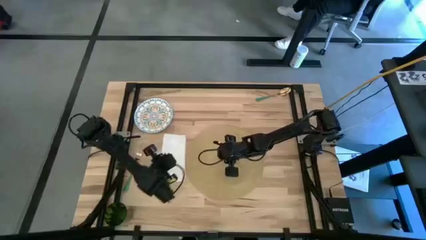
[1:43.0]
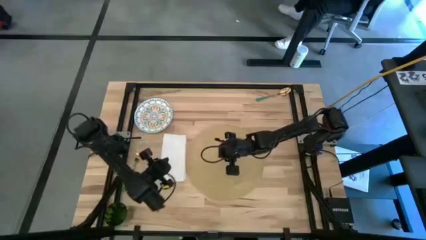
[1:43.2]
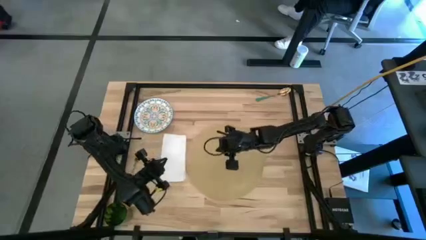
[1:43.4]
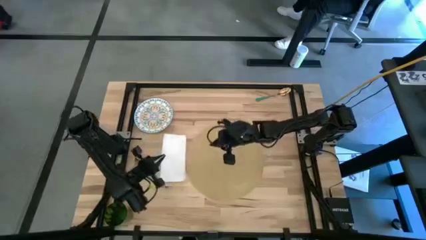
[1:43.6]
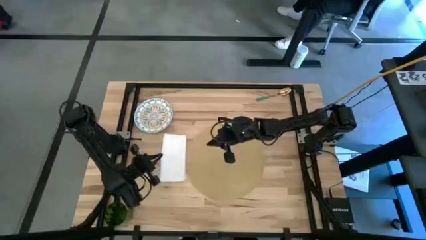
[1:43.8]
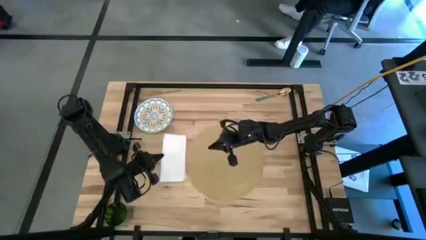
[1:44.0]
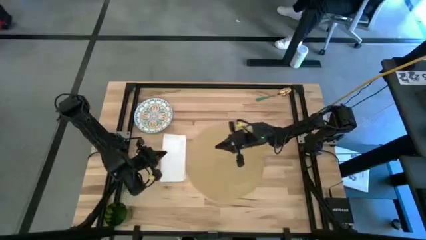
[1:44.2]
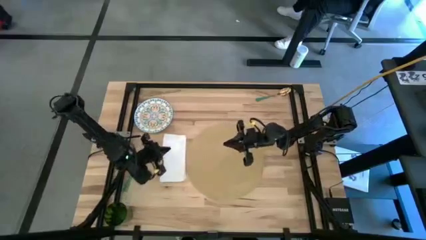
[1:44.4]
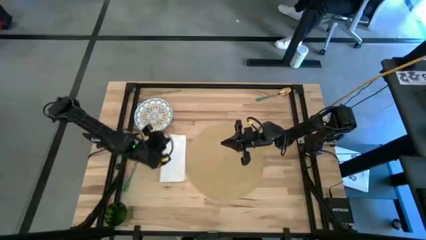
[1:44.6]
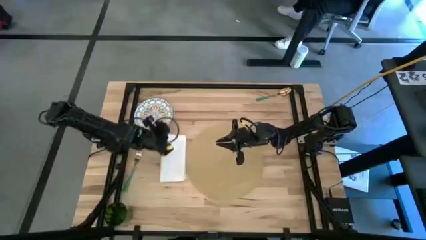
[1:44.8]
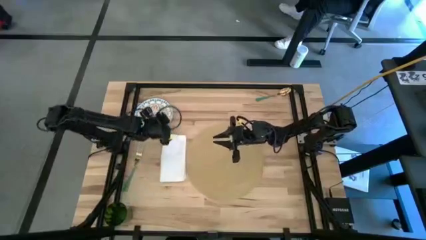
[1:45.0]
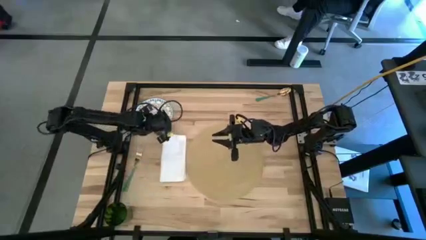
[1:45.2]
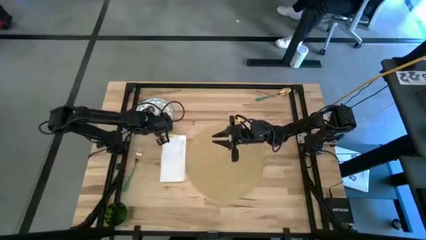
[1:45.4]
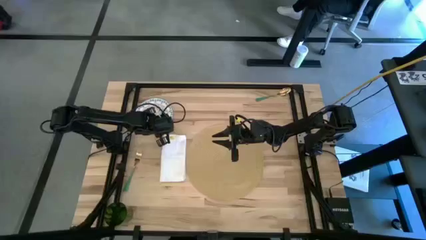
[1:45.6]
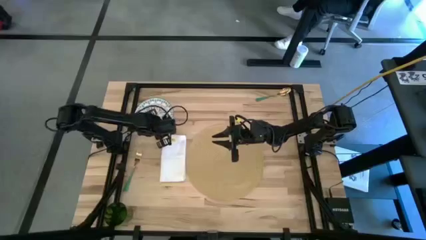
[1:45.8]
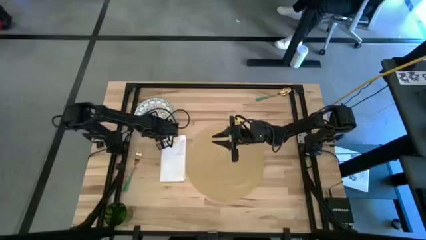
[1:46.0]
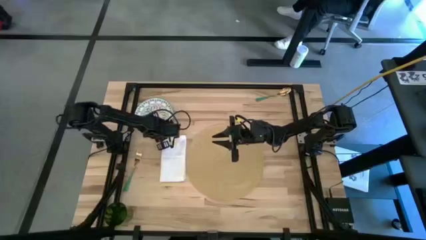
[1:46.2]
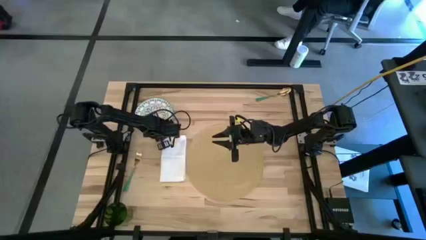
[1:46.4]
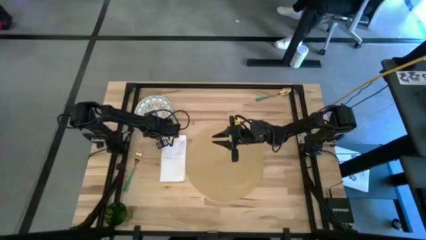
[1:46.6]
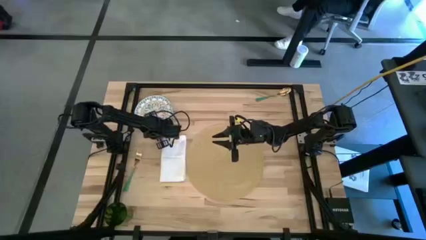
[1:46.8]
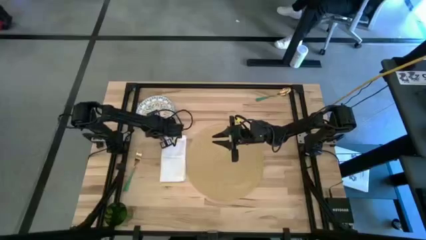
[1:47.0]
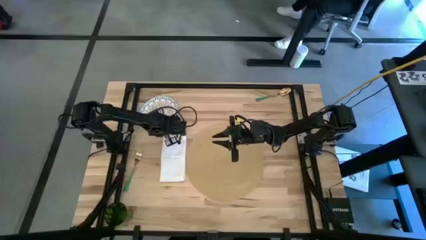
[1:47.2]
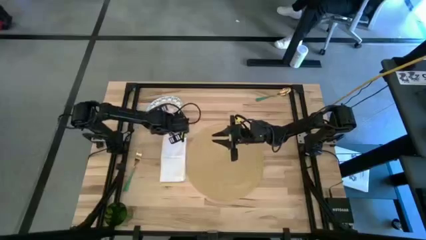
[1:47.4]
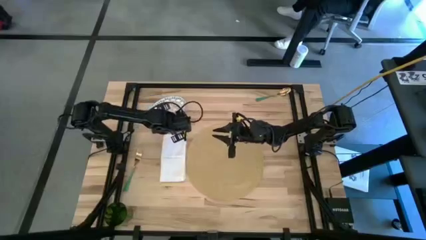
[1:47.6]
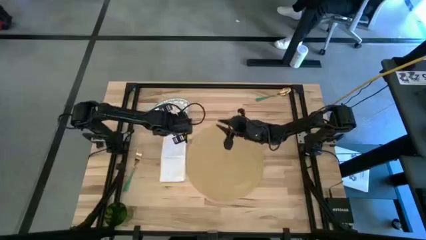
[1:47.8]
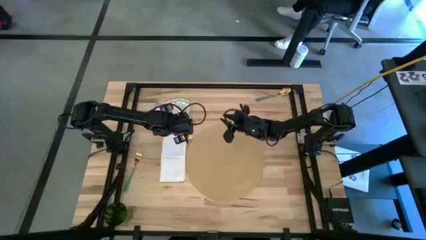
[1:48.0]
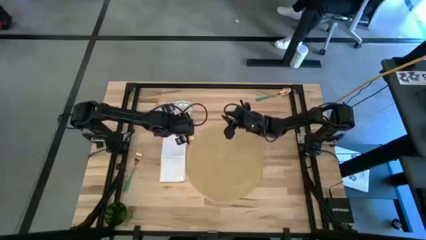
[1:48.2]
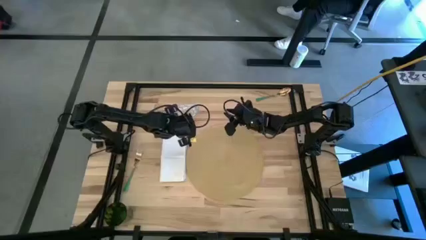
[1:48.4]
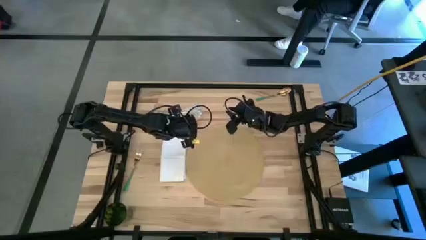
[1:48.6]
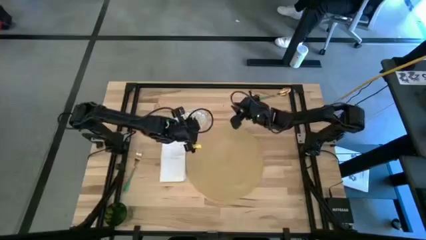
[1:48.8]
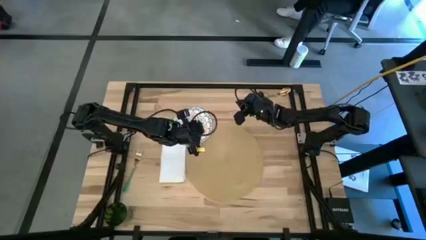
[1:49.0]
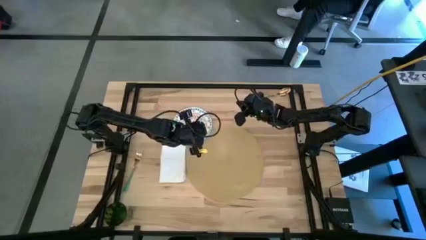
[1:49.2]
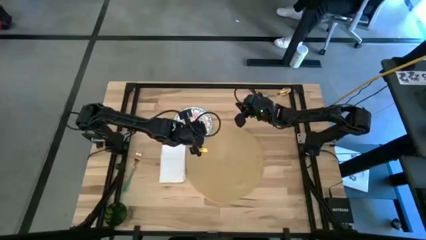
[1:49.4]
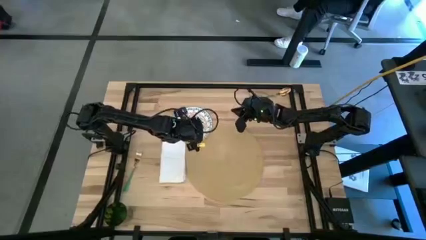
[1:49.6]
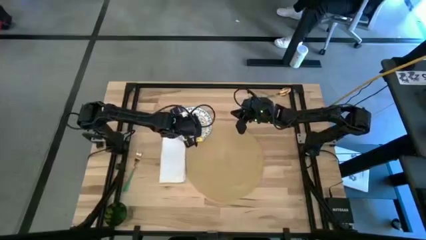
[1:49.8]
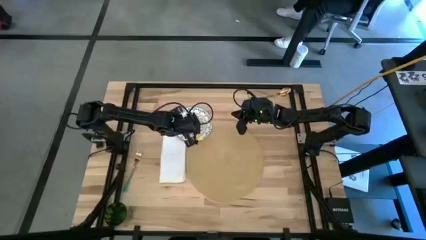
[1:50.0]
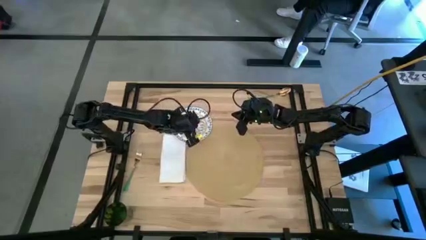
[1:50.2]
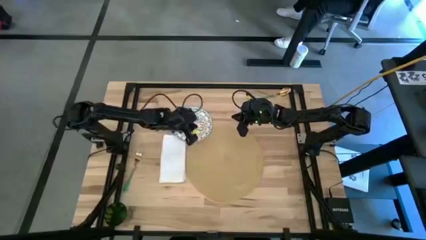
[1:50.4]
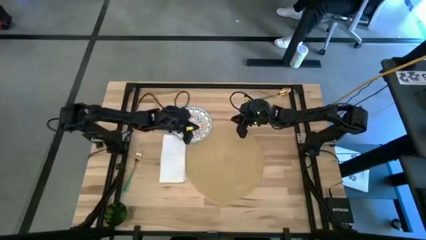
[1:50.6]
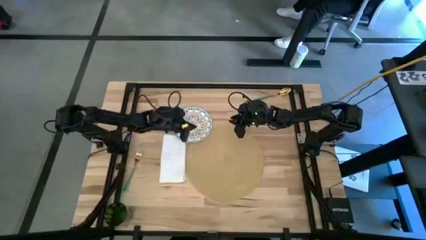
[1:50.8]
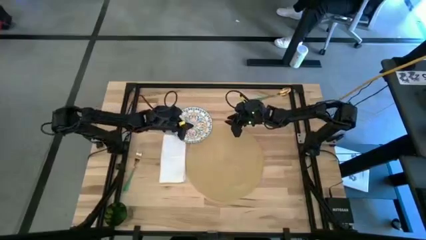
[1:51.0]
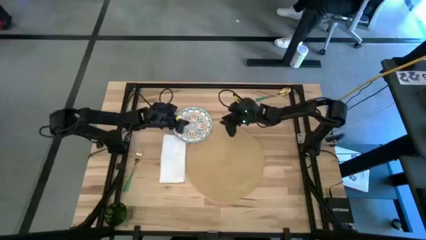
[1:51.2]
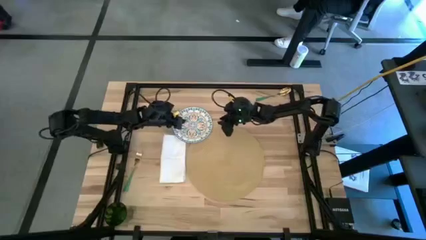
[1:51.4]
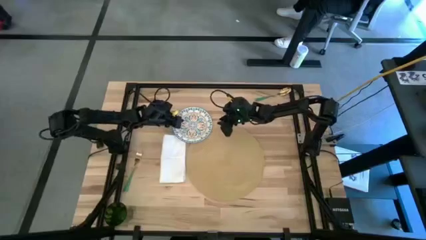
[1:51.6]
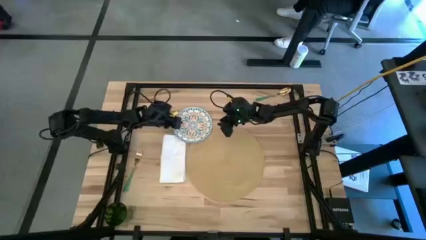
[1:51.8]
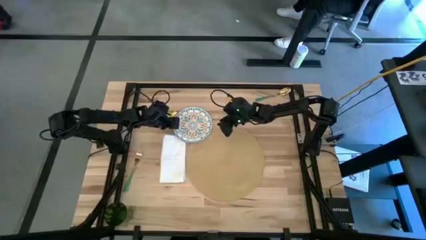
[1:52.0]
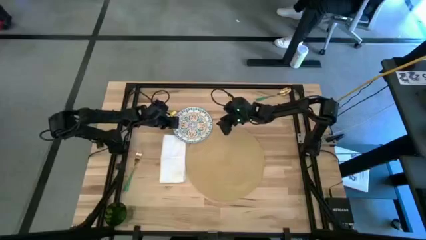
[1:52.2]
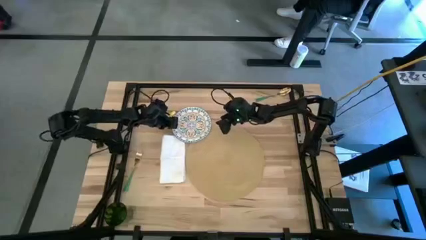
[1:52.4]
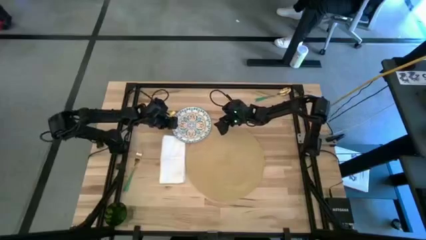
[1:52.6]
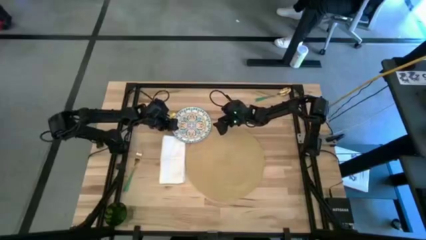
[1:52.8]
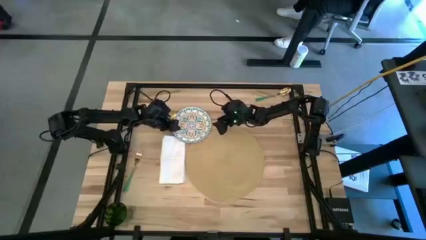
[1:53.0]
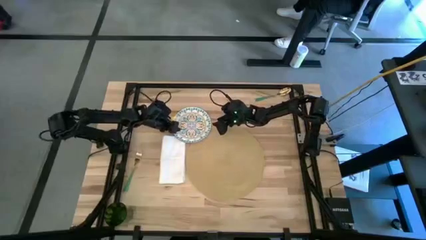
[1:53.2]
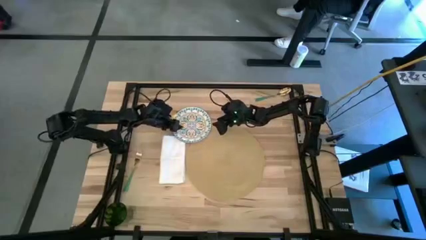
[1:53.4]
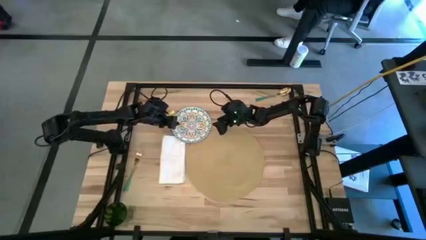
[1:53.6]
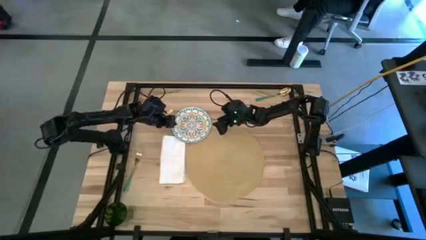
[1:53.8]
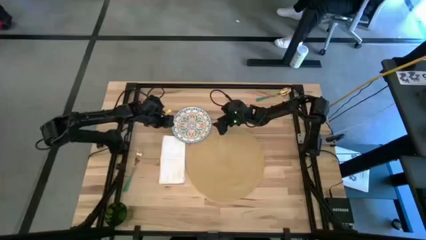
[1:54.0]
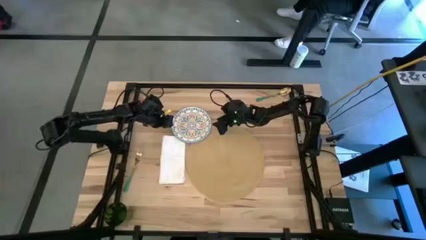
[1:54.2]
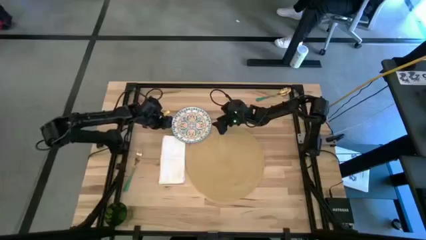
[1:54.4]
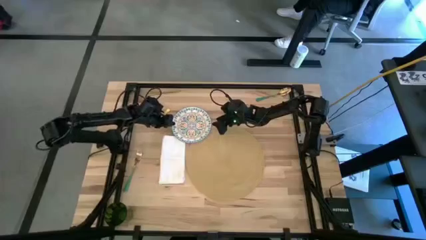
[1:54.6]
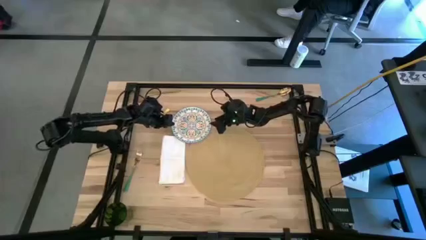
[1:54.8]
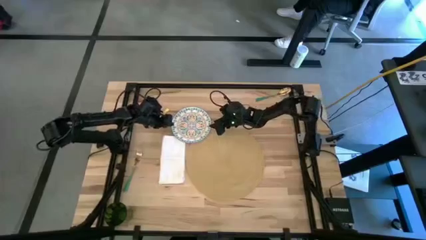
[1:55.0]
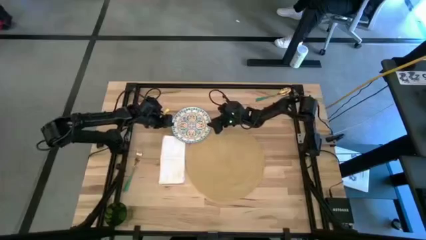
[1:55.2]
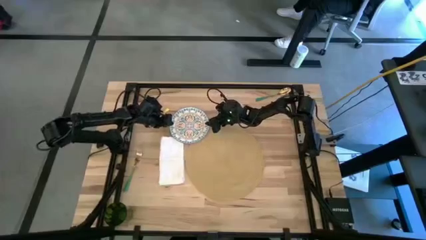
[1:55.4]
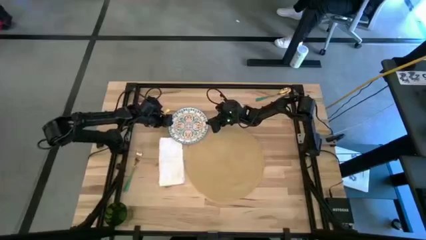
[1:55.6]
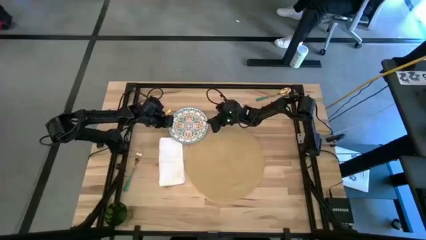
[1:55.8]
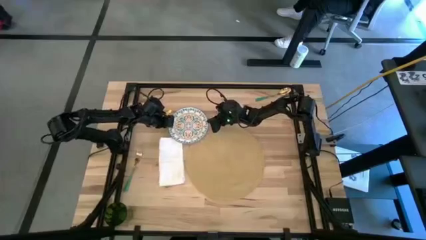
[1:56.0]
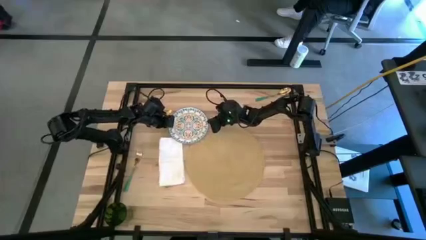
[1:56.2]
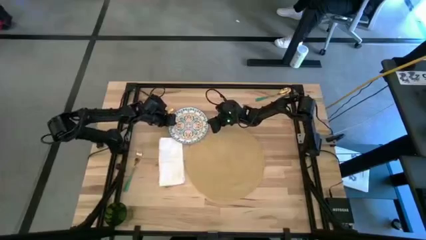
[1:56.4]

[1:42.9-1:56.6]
Task: Set table place
Put the blue patterned plate on the brown place mat

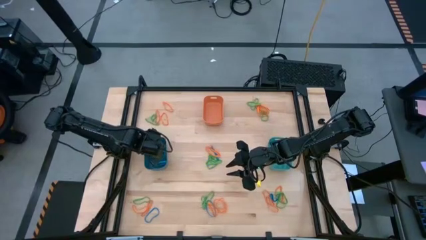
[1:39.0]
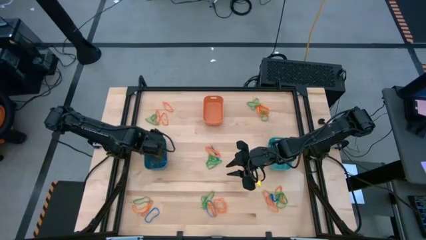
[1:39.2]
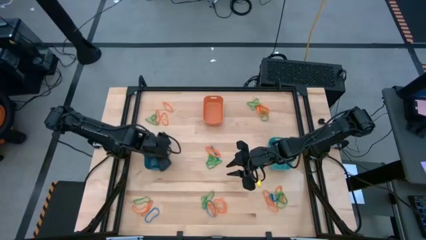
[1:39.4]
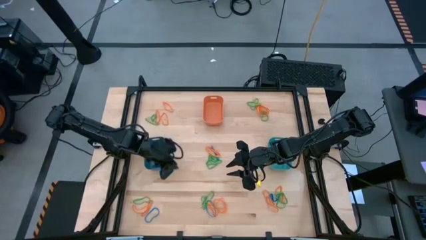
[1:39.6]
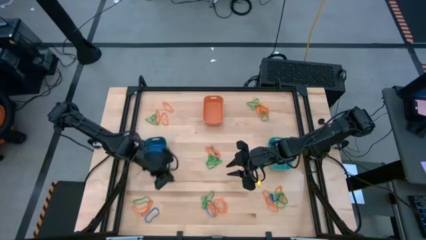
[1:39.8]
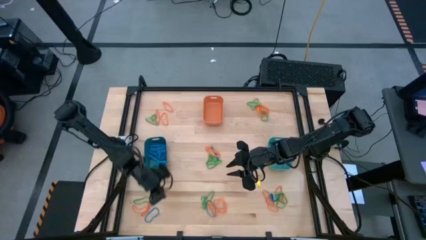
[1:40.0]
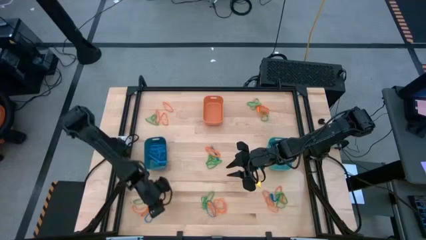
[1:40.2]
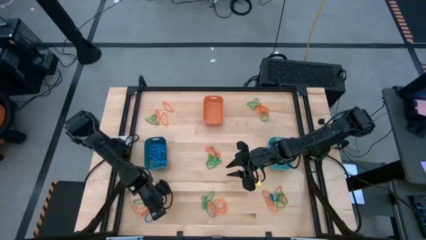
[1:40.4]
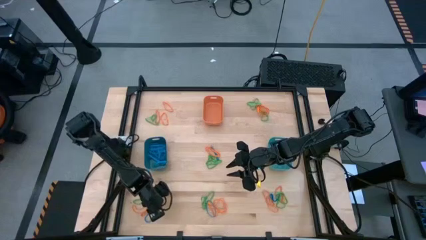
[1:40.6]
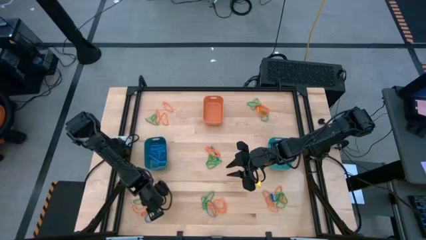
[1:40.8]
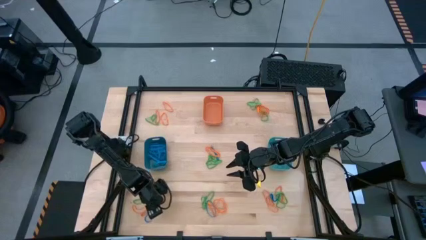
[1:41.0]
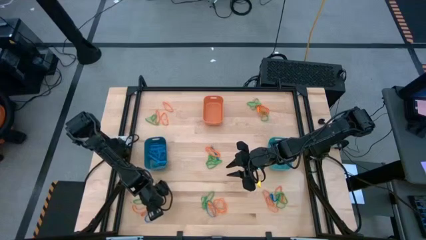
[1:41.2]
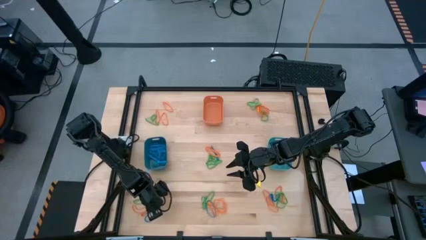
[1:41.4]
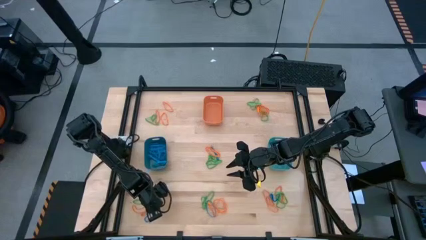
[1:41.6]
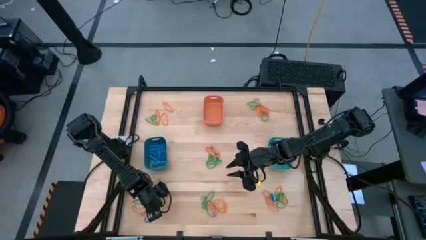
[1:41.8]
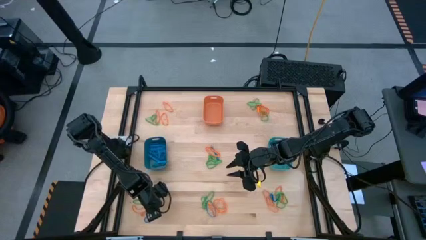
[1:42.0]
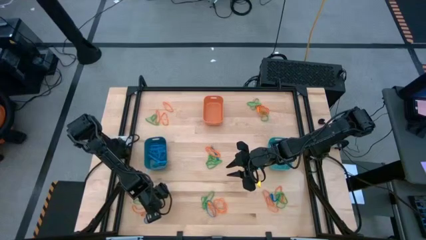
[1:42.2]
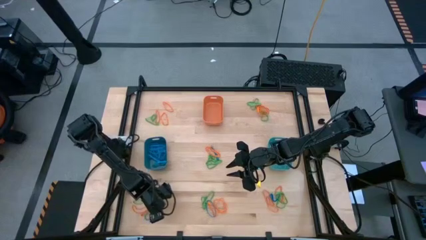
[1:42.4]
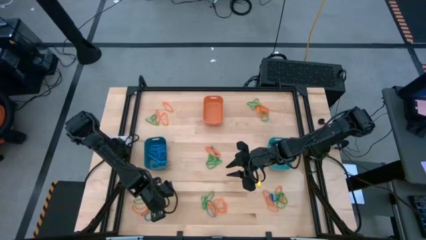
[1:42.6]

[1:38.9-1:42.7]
Task: Sort rubber bands into baskets
Put the blue rubber band into the blue bin
